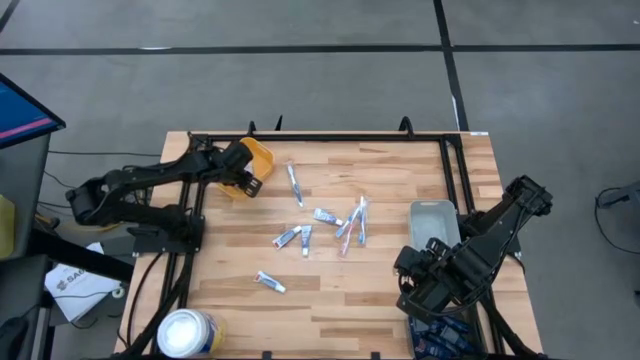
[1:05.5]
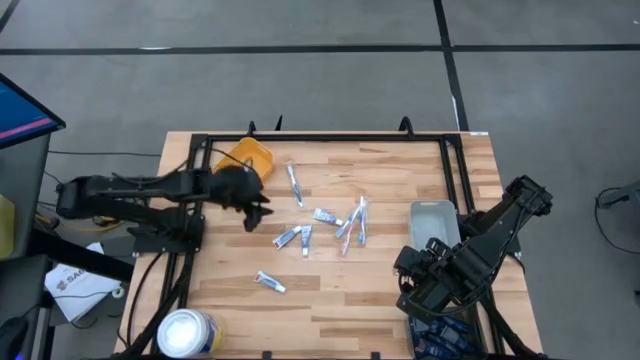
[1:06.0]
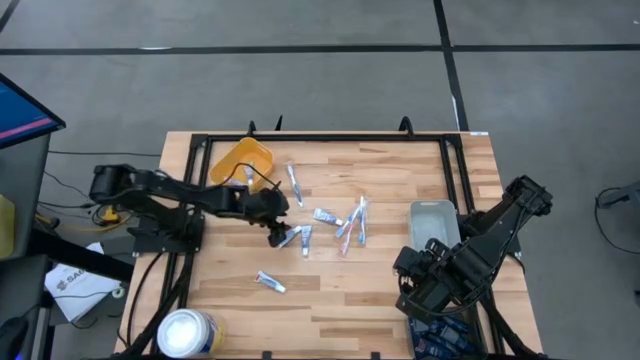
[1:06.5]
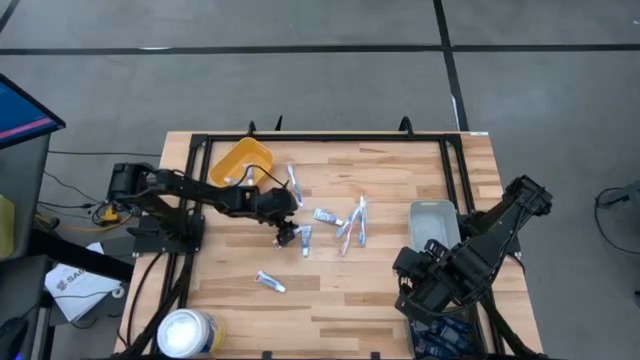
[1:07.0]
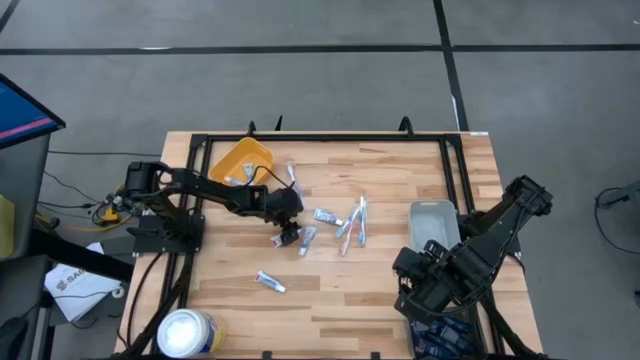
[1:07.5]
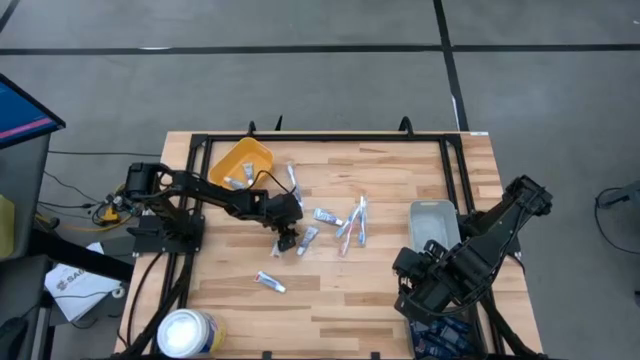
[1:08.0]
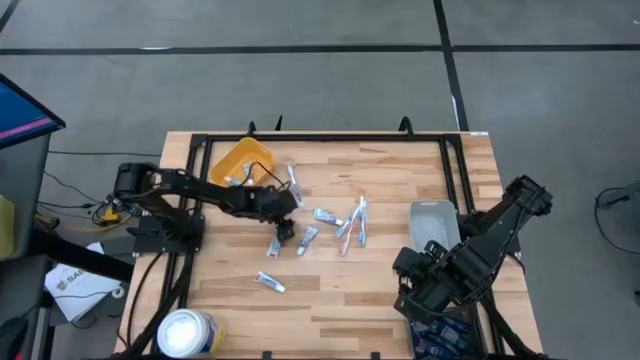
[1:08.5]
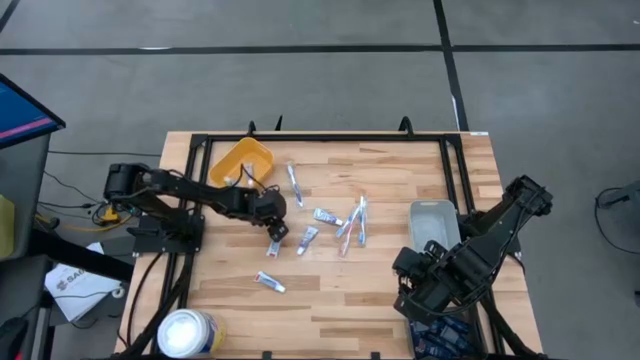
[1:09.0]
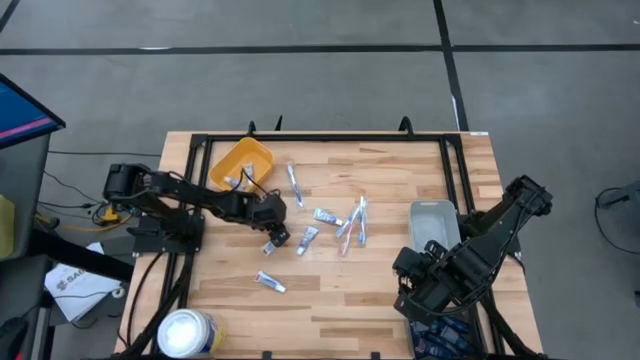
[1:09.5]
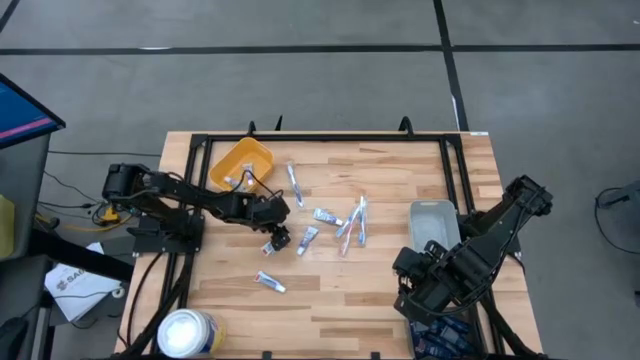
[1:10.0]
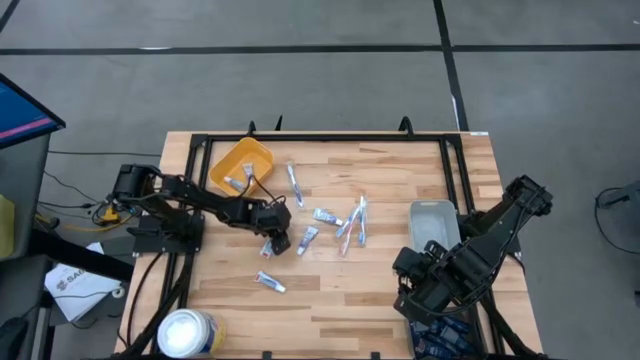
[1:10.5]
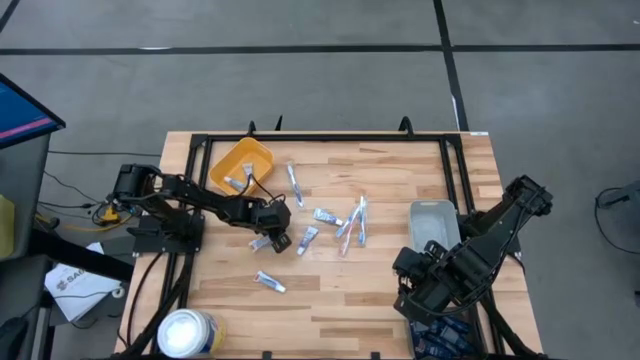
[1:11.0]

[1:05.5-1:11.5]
Task: Pick & Place Travel size toiletries
Put the white toothpaste into the yellow bin

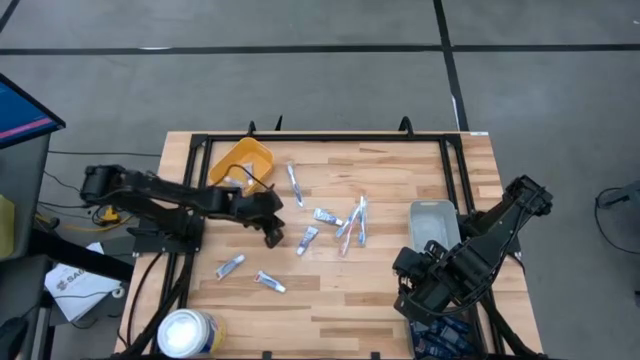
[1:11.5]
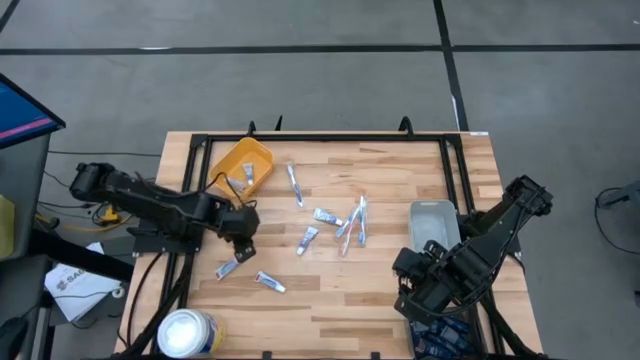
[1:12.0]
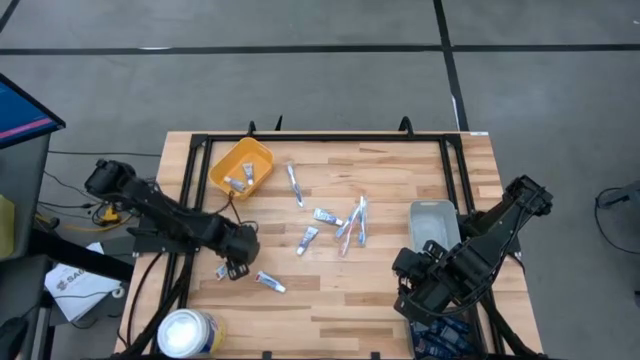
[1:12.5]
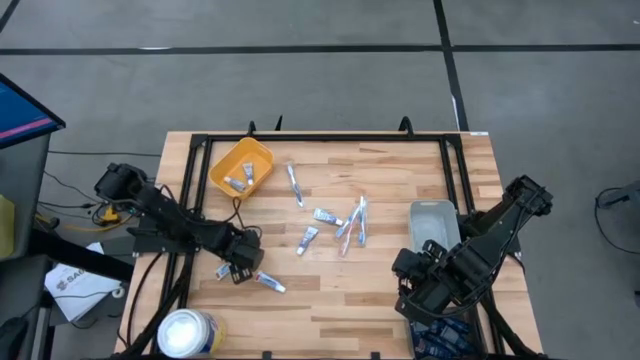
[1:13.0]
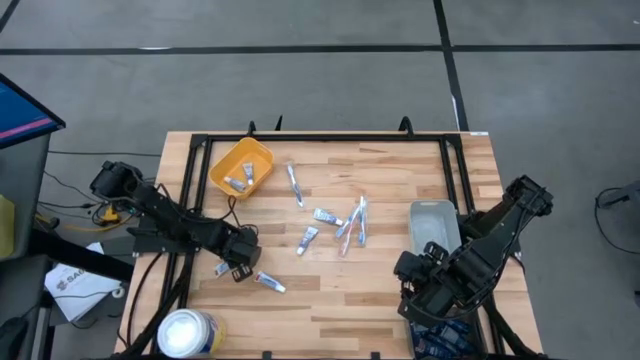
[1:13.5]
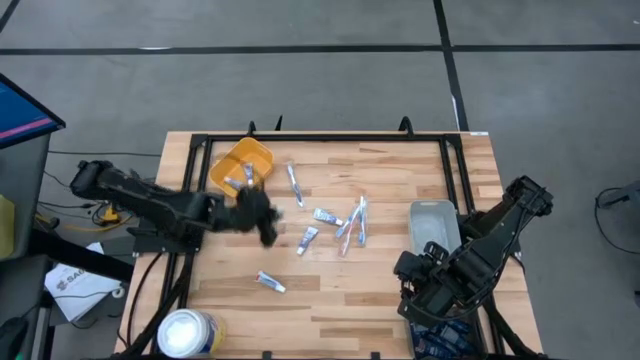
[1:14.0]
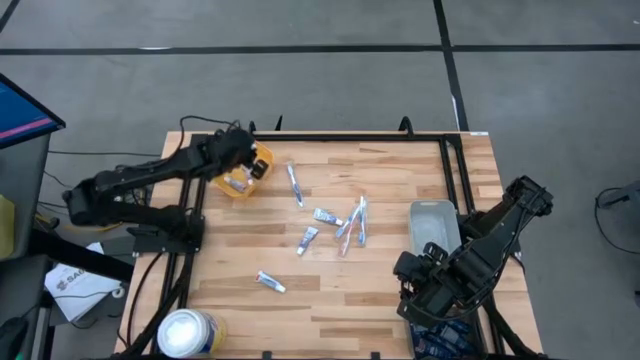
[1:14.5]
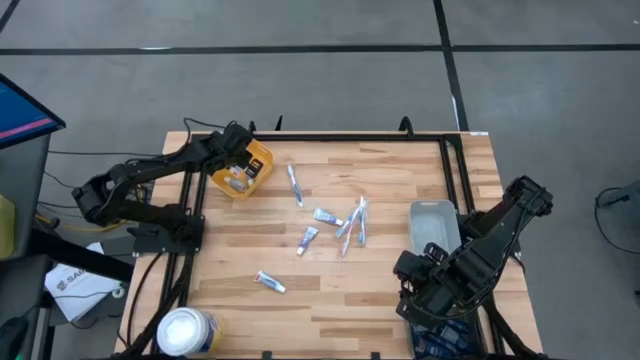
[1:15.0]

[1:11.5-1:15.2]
Put the white toothpaste into the yellow bin

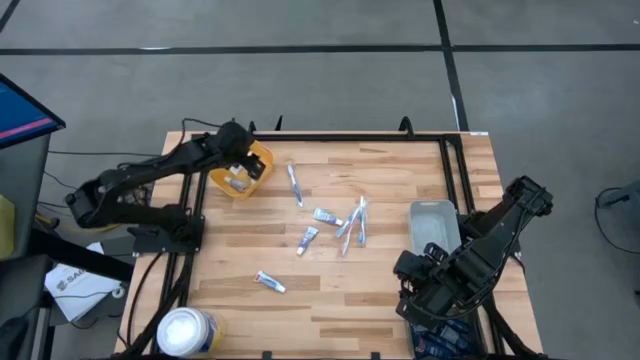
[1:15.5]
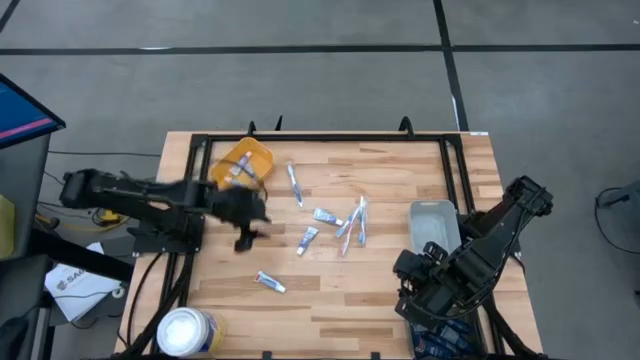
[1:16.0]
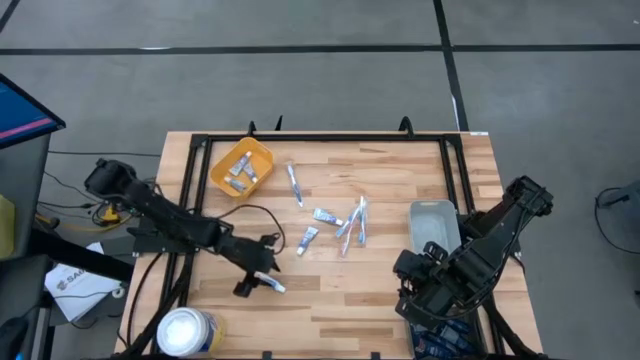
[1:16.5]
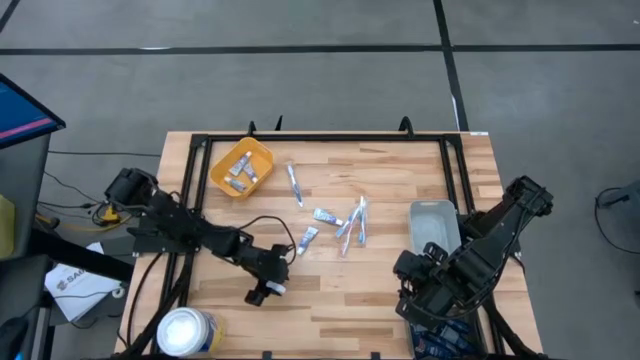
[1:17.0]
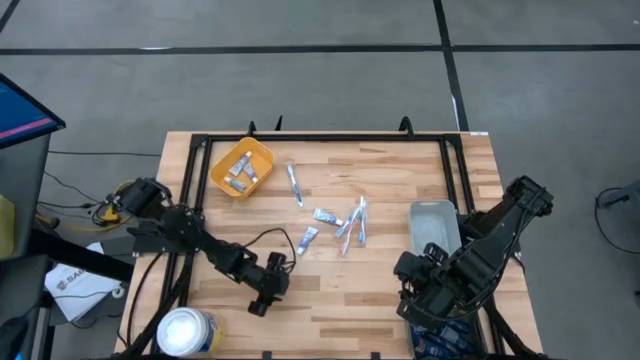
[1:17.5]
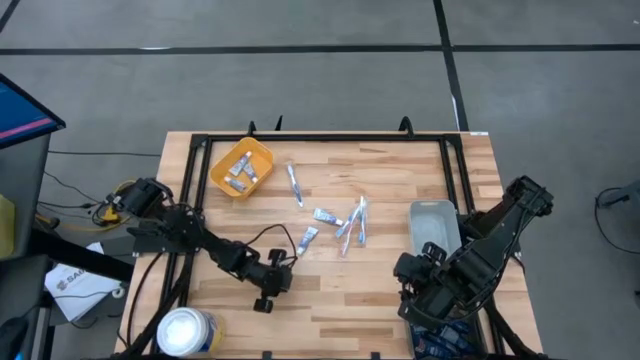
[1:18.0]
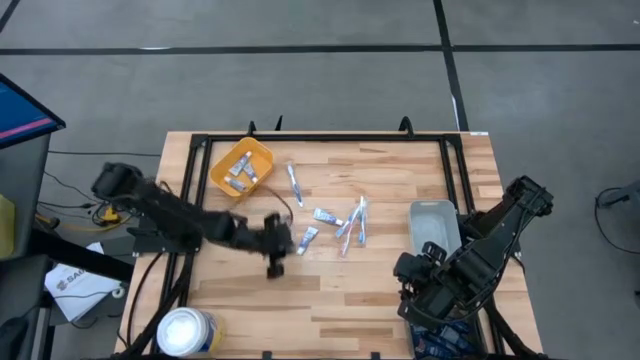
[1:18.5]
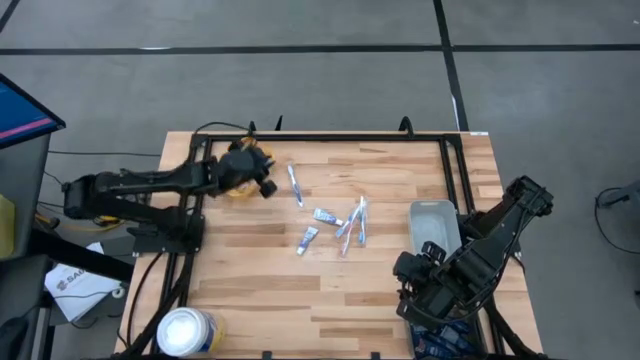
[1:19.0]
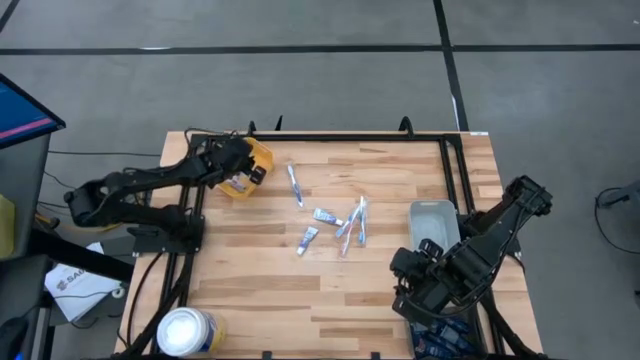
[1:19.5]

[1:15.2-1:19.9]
Put the white toothpaste into the yellow bin

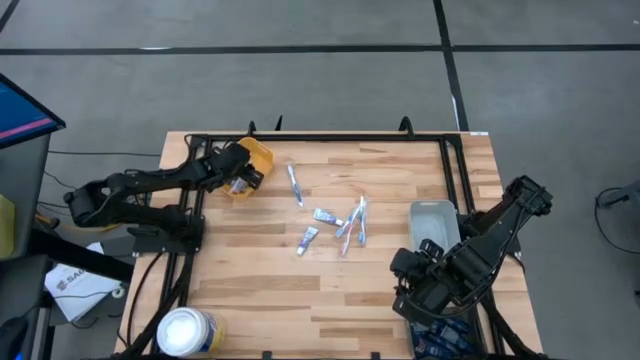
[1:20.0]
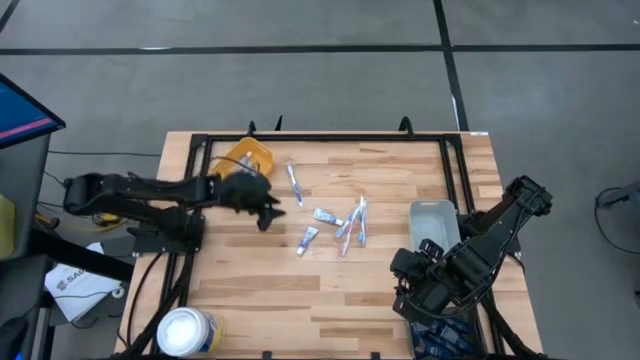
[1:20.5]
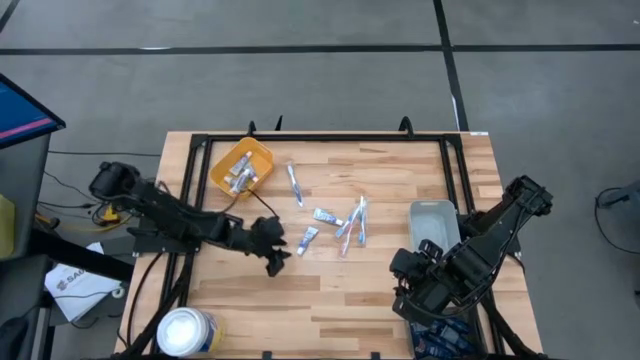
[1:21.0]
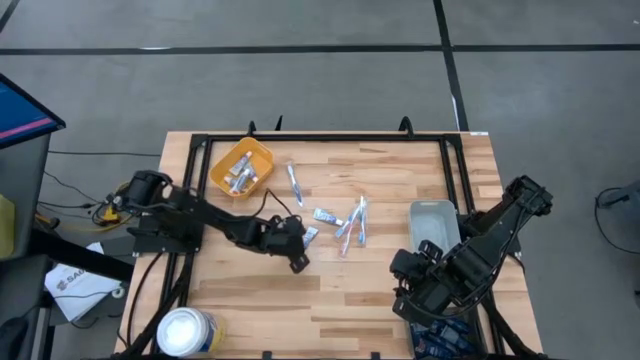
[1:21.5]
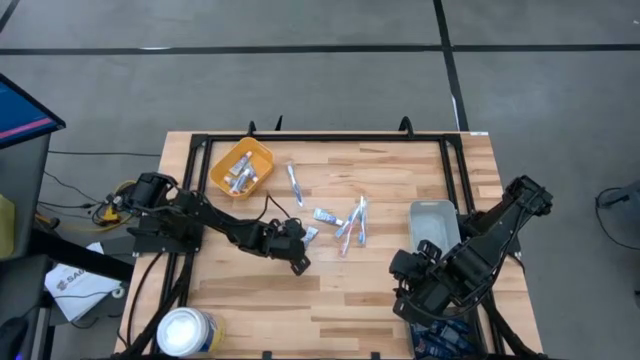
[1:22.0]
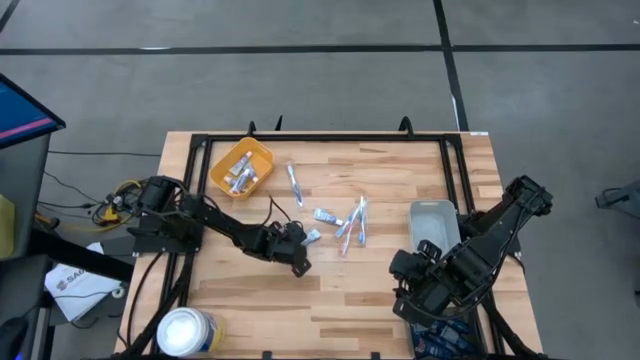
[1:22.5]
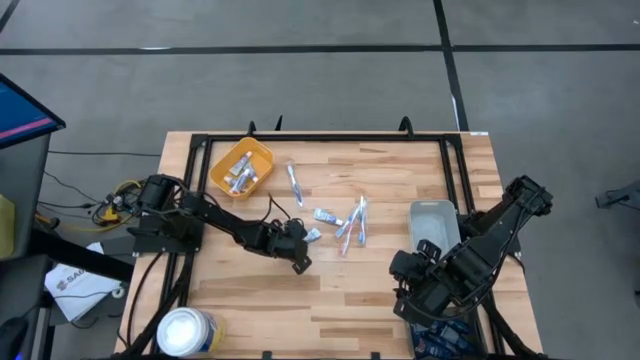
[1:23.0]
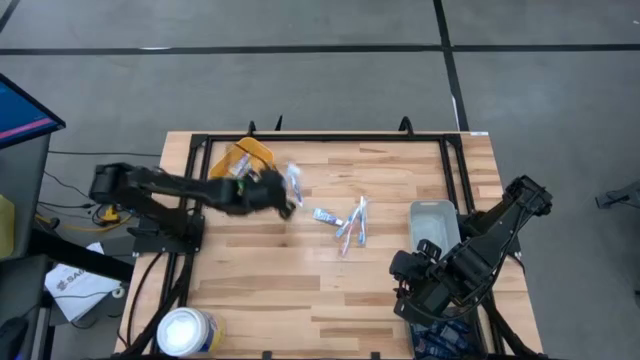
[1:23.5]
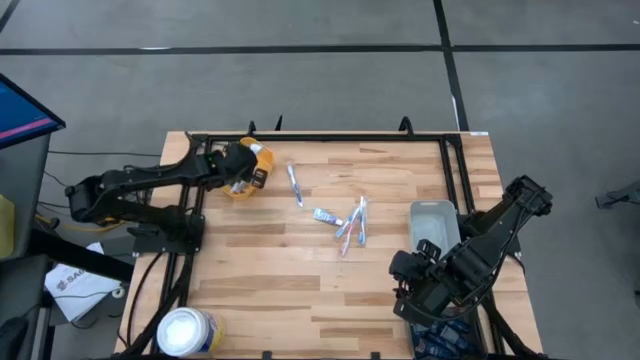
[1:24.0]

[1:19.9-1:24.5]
Put the white toothpaste into the yellow bin

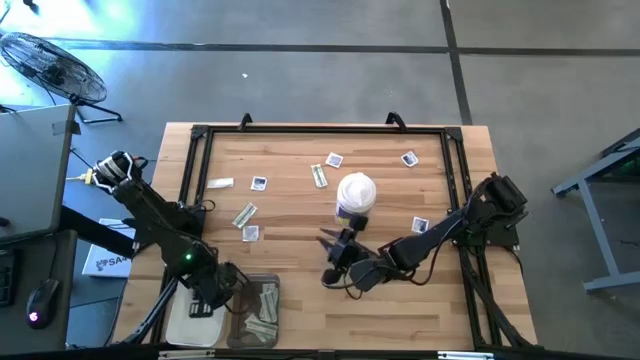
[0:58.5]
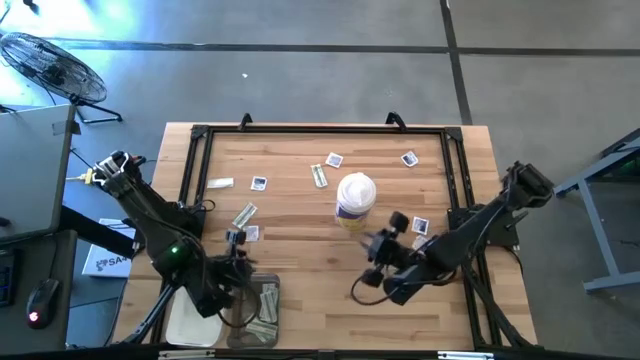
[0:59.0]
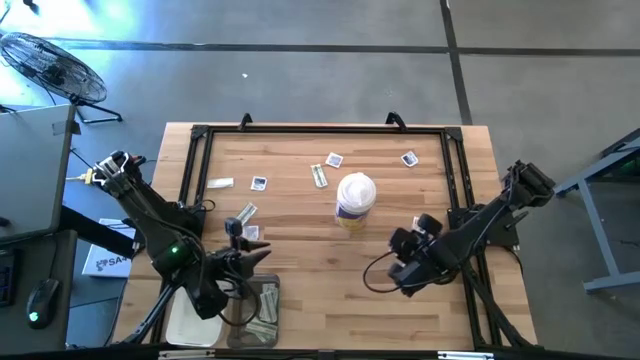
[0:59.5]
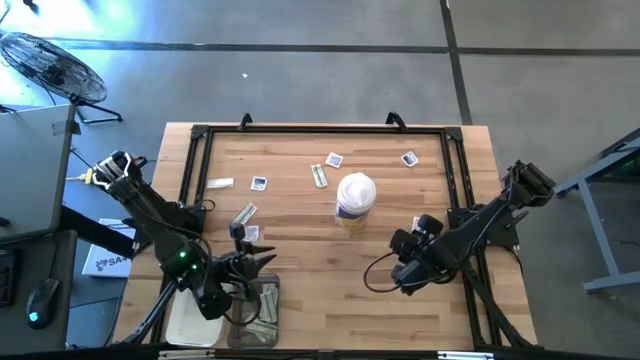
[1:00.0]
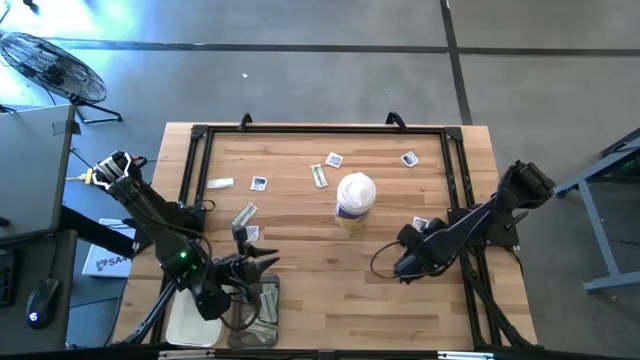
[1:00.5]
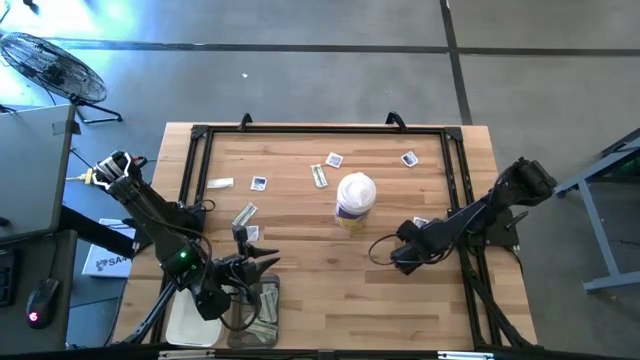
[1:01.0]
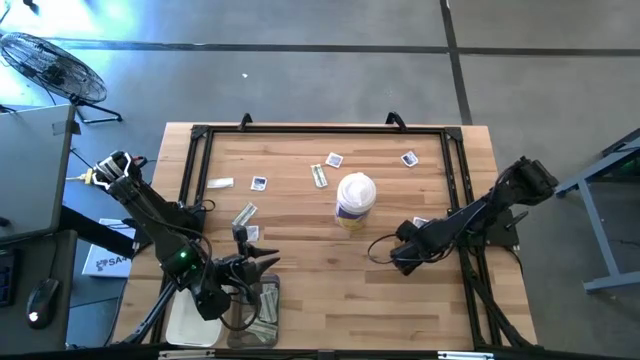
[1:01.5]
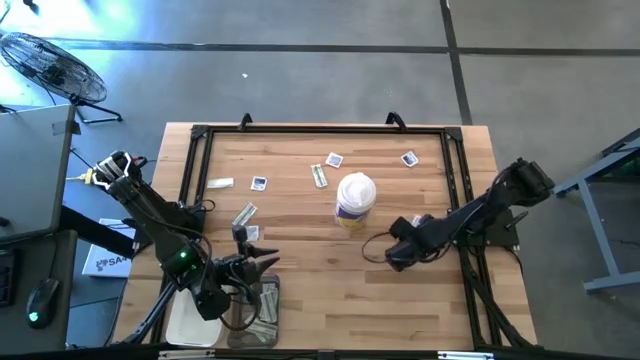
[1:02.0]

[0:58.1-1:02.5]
Task: Pick & Place First Aid Supplies
Put the alcohol pad into the white bin
